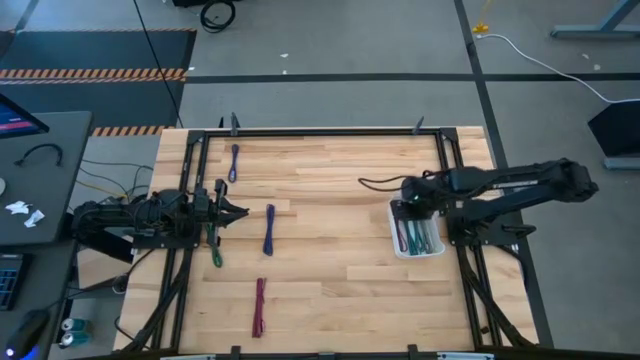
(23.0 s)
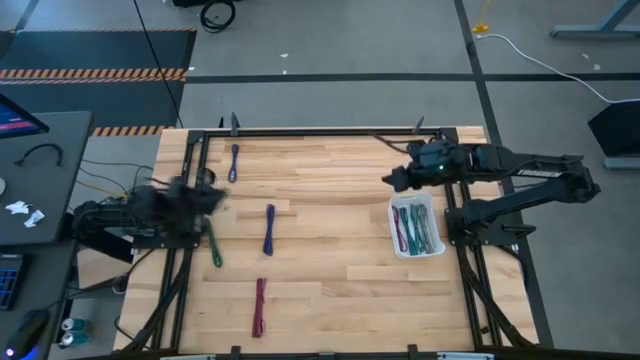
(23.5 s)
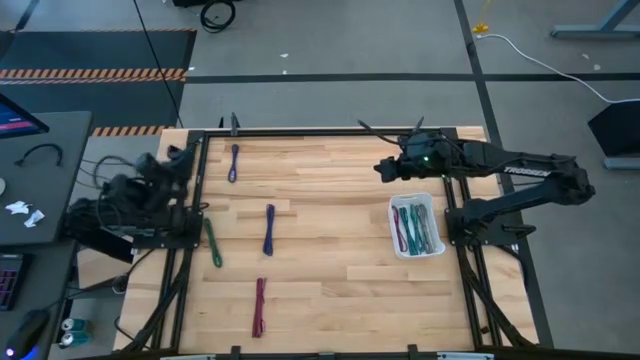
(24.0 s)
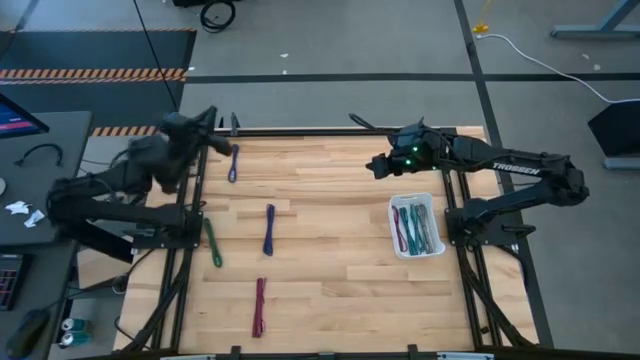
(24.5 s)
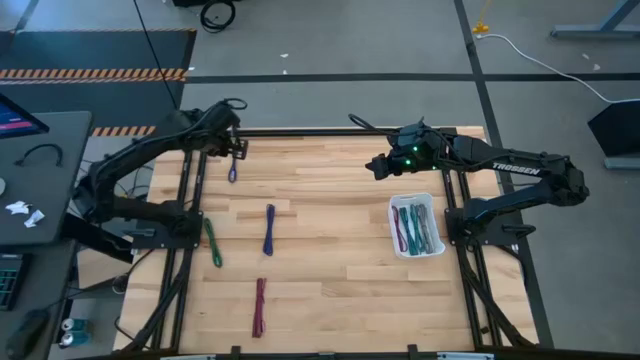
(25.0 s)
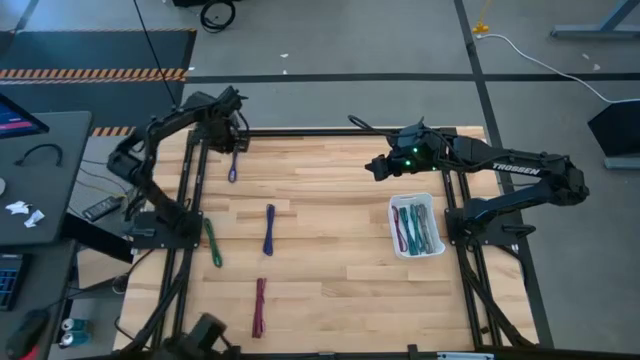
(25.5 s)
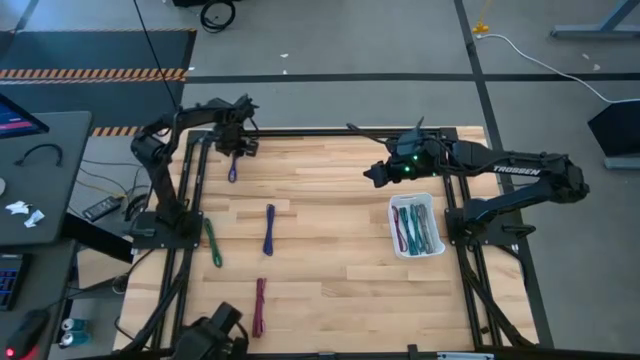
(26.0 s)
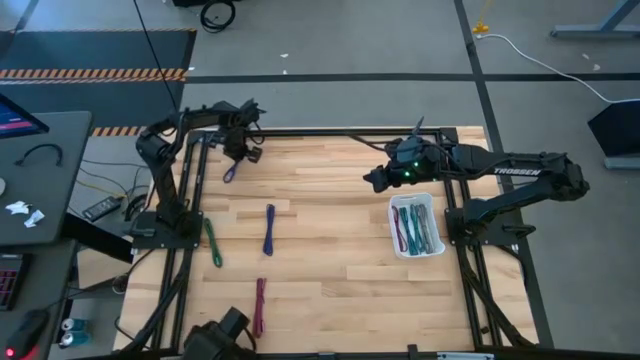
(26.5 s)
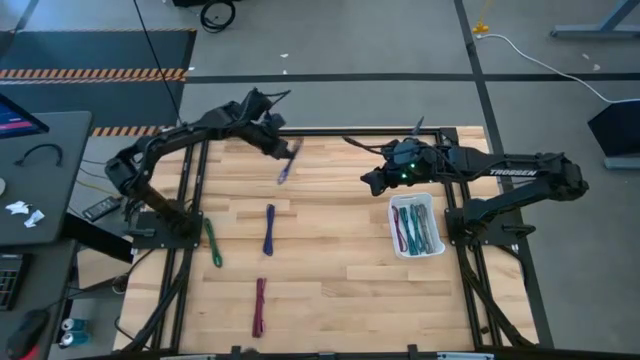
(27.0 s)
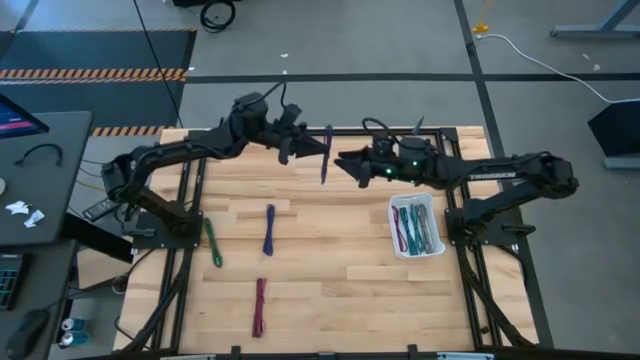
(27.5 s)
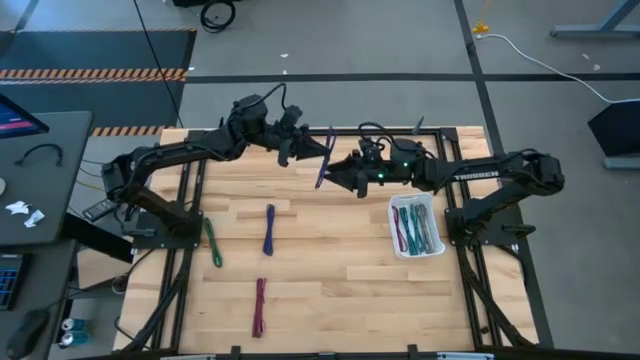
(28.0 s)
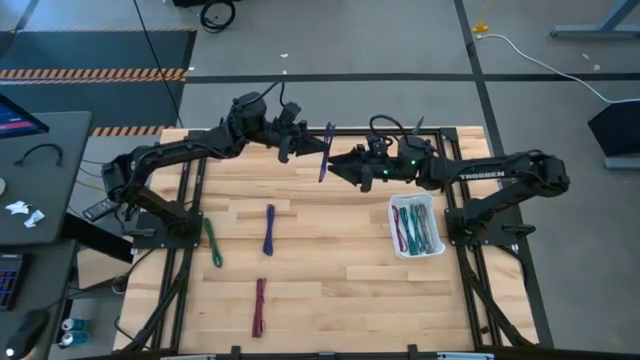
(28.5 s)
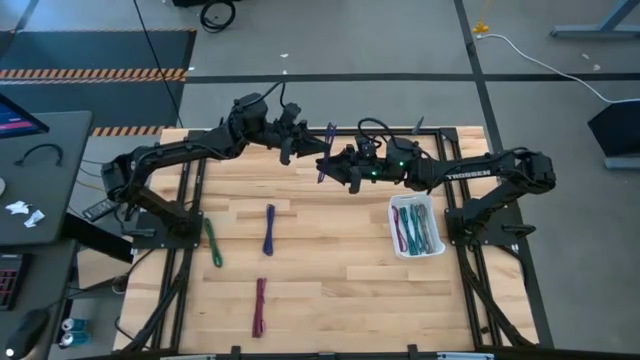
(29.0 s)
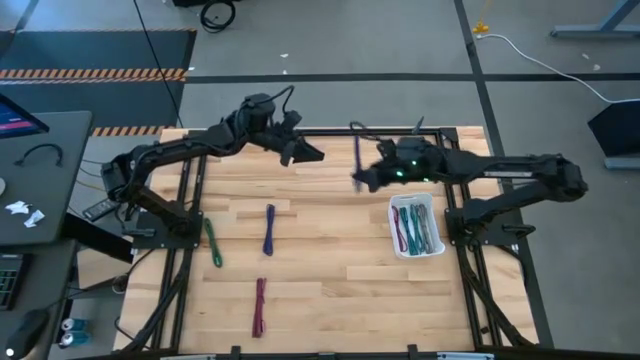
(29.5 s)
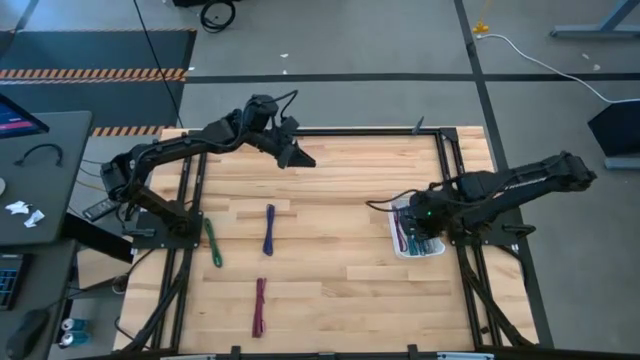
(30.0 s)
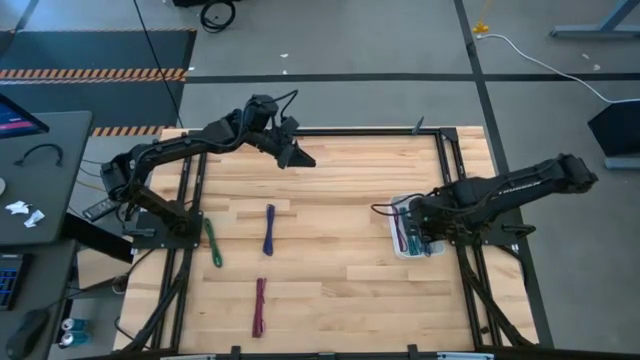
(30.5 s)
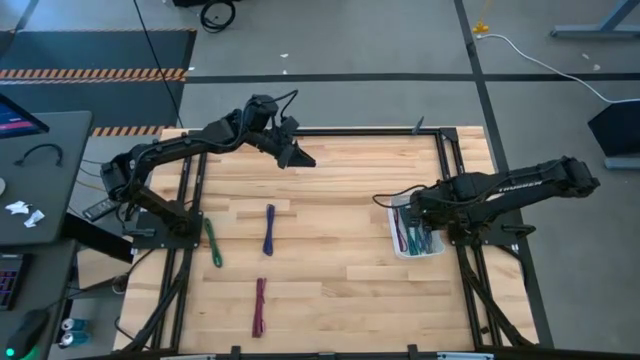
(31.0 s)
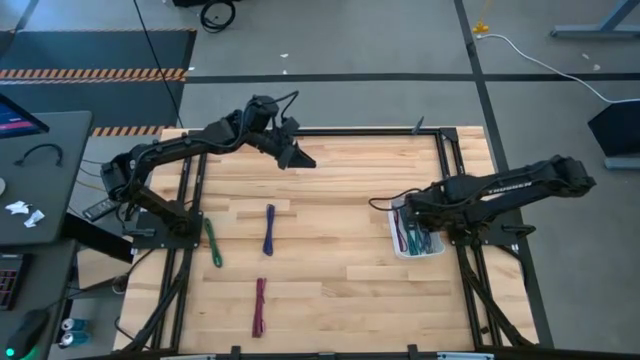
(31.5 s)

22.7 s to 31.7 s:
Task: Pick and place USB-C Cables
Put the top violet charging cable into the white bin

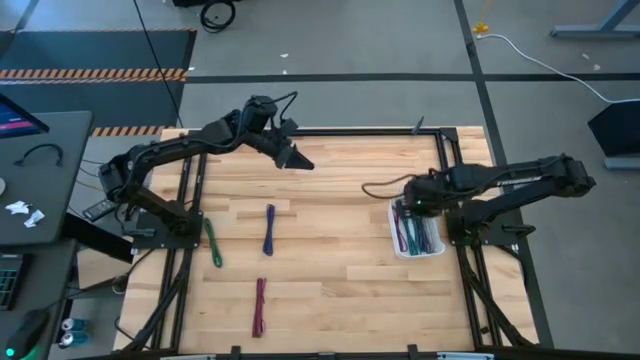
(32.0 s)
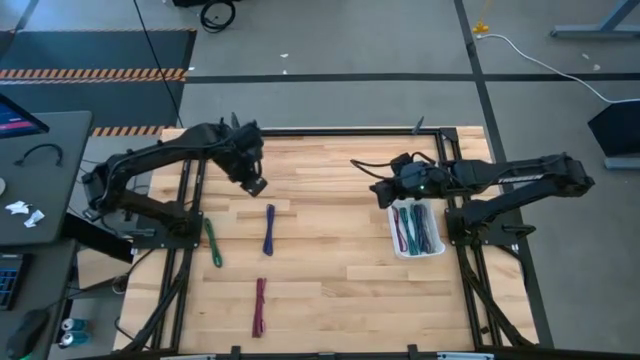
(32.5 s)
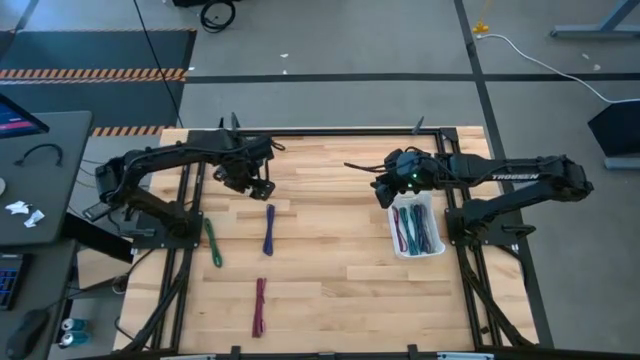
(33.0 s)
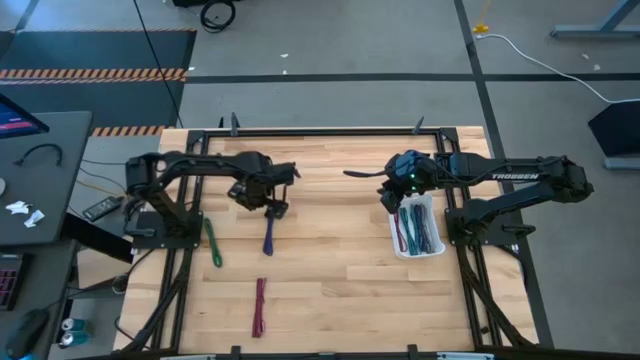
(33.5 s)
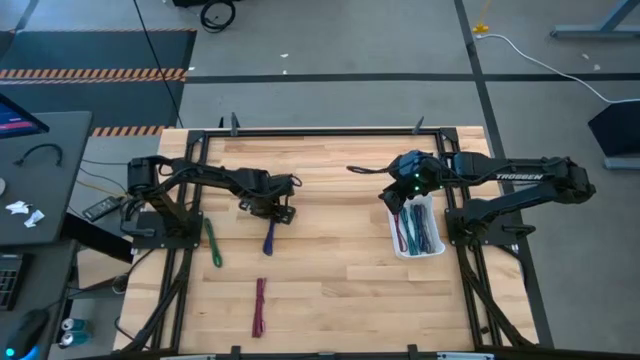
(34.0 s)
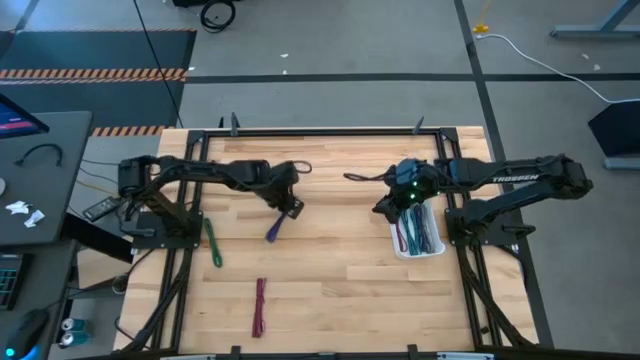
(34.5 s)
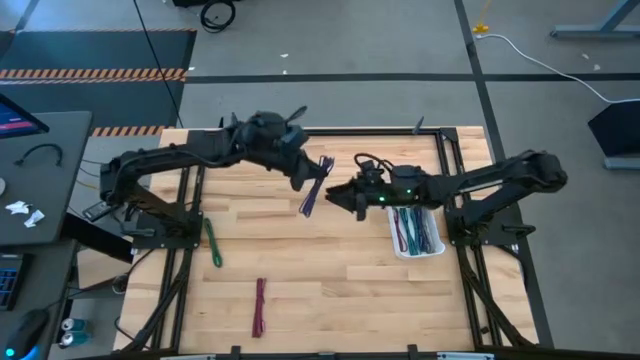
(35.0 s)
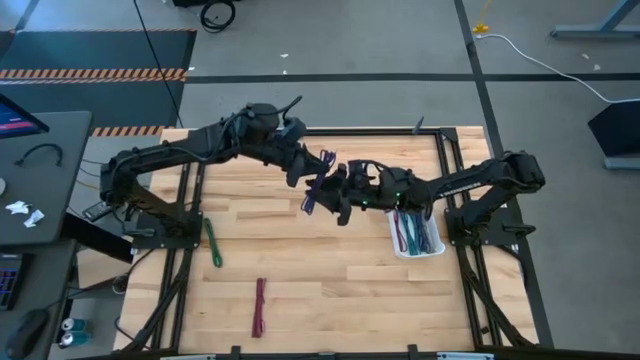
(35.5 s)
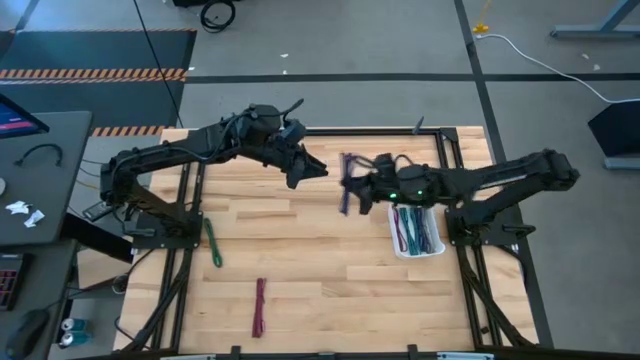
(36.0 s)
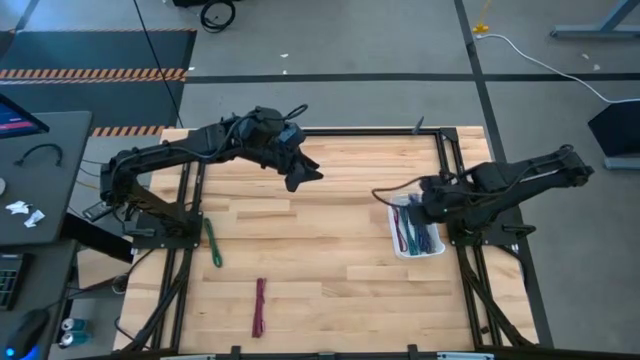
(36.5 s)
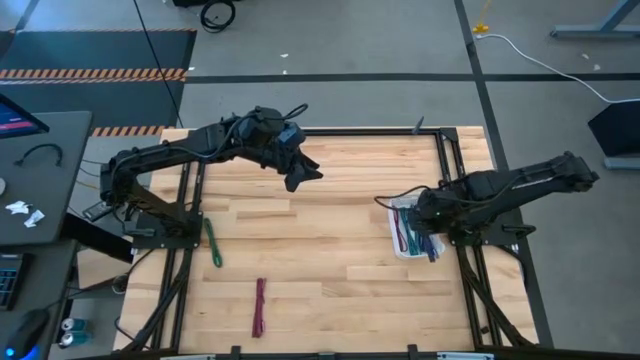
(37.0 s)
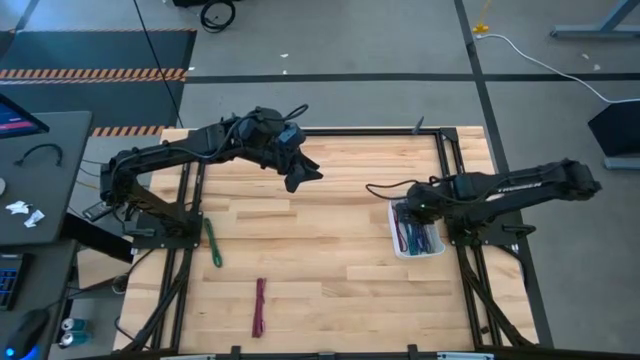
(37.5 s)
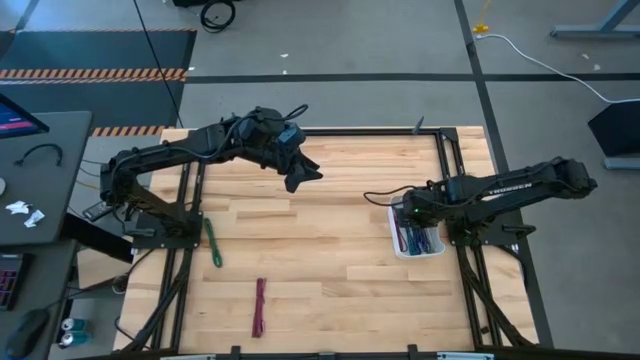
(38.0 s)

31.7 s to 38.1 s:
Put the violet charging cable into the white bin

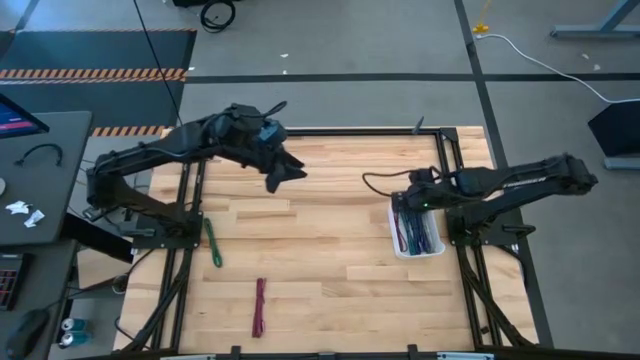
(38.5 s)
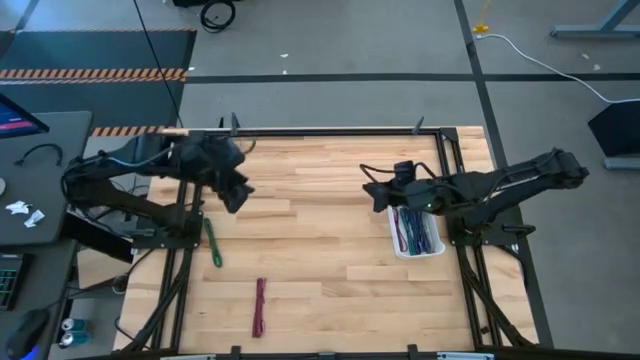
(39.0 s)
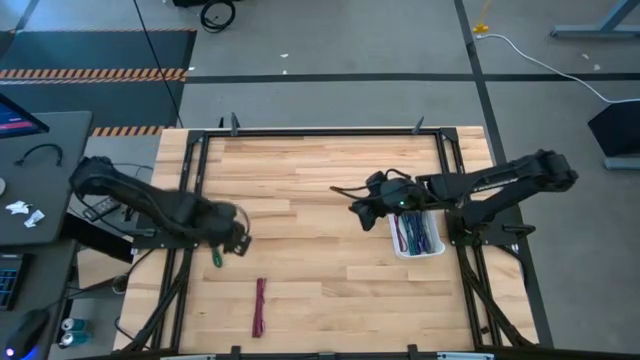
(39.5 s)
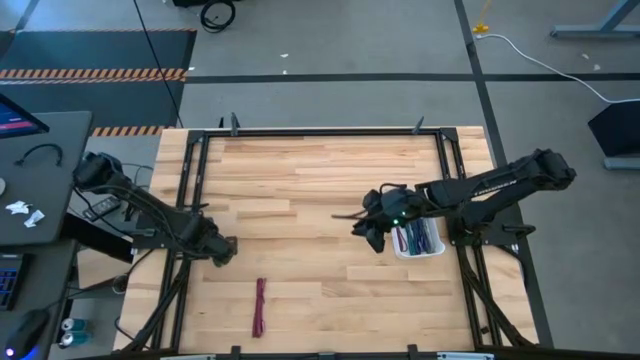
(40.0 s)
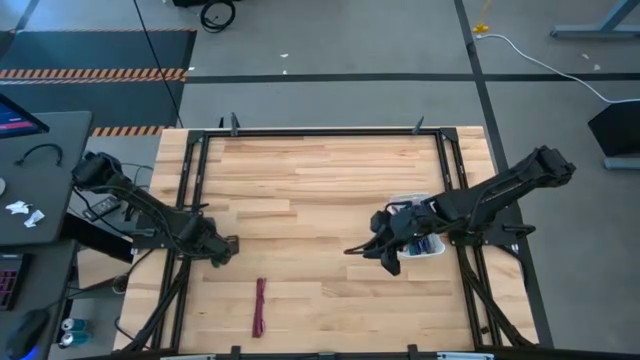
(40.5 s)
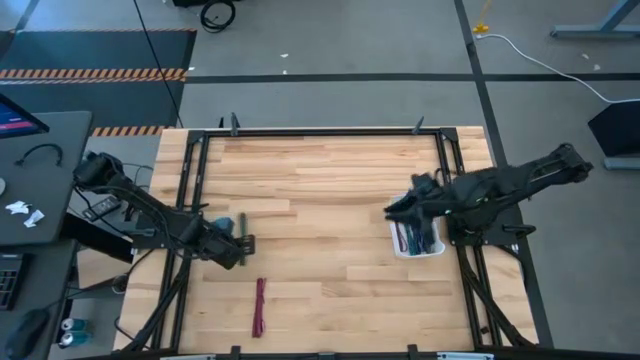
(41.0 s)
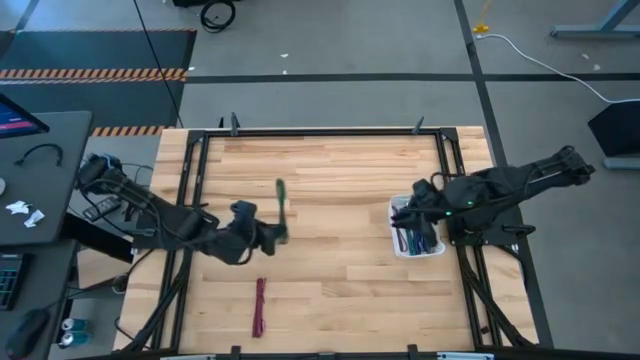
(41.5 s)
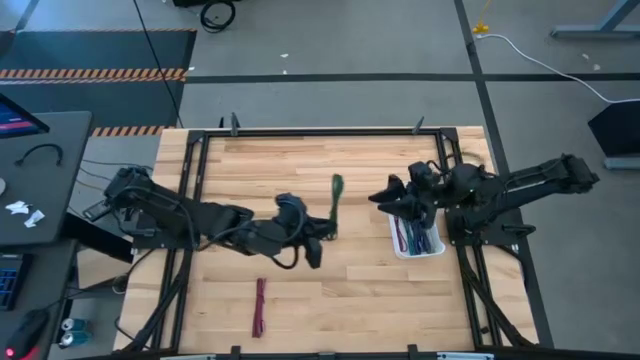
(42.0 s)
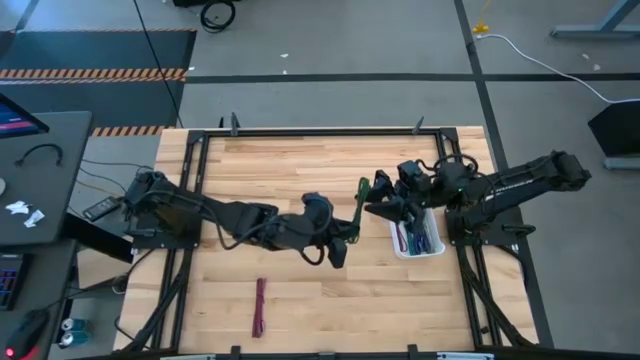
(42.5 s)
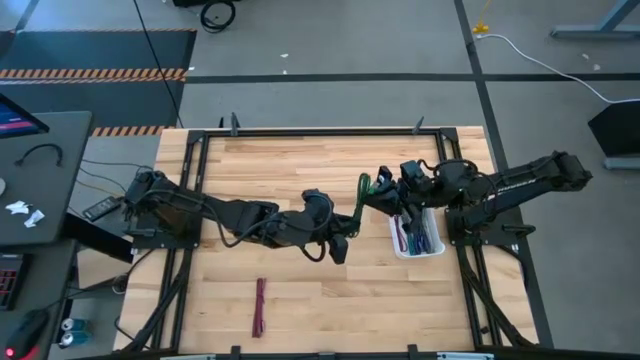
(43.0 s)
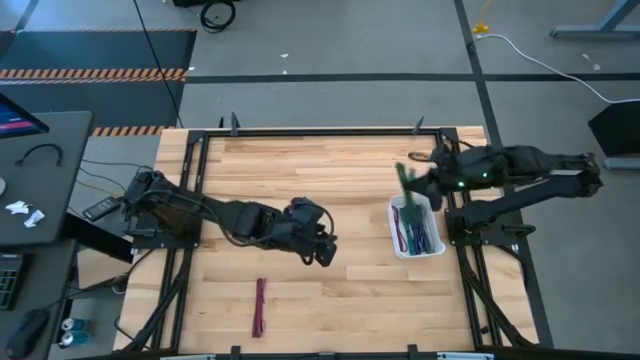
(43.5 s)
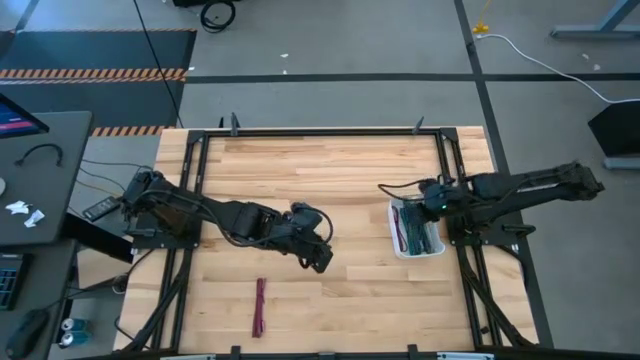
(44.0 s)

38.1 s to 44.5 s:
Put the green charging cable into the white bin

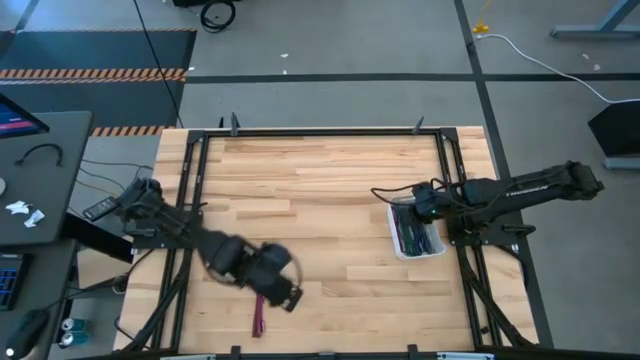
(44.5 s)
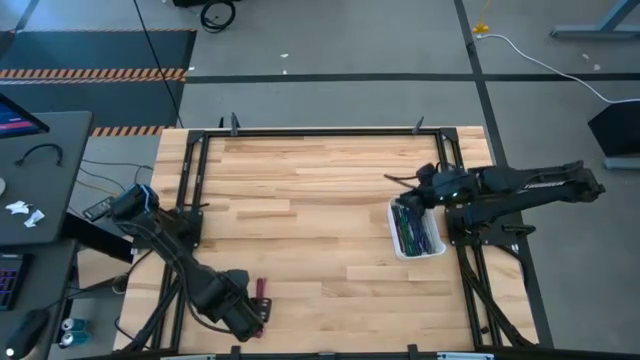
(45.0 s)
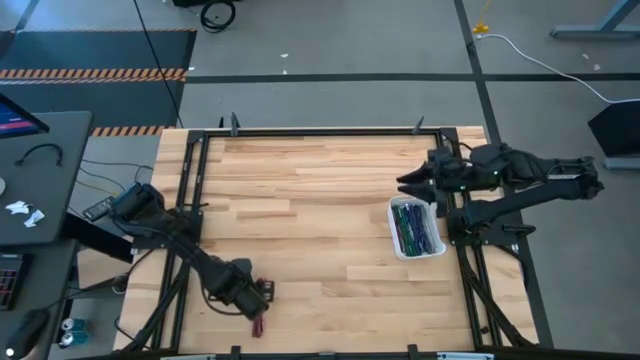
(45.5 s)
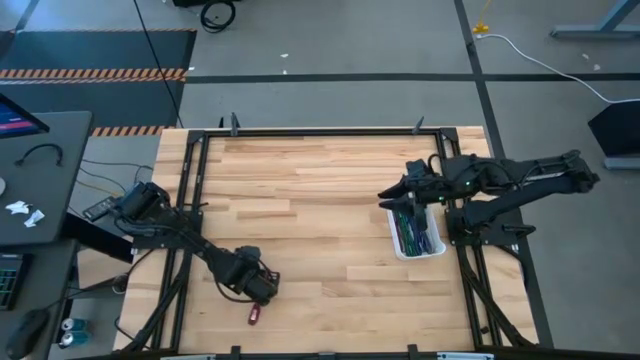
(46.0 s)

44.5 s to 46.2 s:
Put the red charging cable into the white bin
